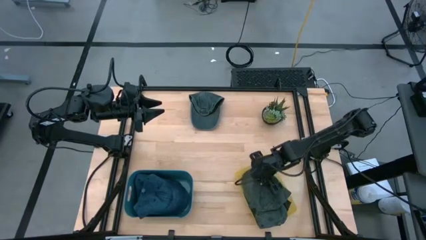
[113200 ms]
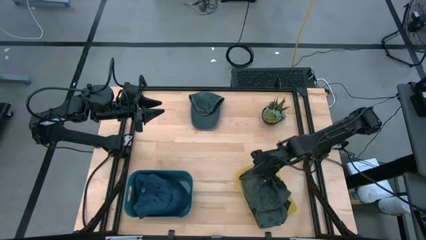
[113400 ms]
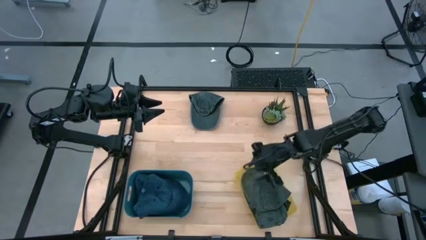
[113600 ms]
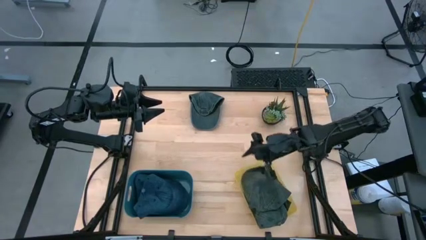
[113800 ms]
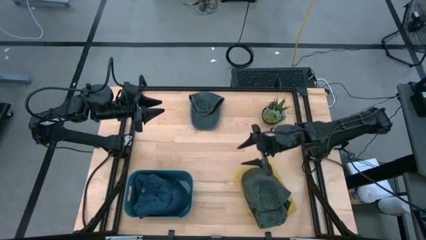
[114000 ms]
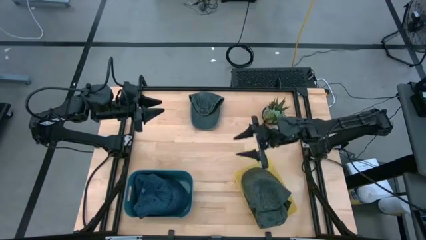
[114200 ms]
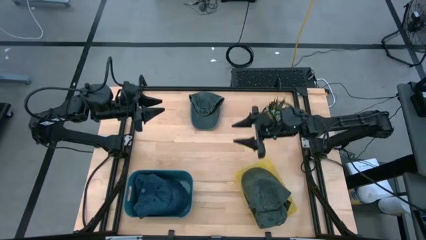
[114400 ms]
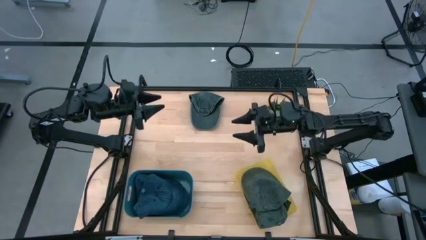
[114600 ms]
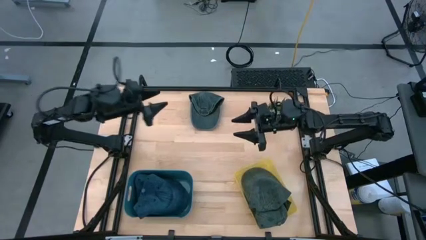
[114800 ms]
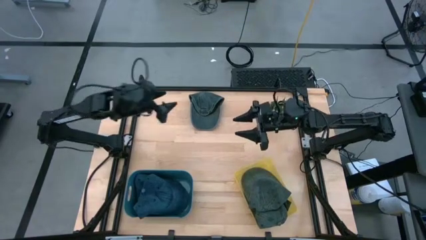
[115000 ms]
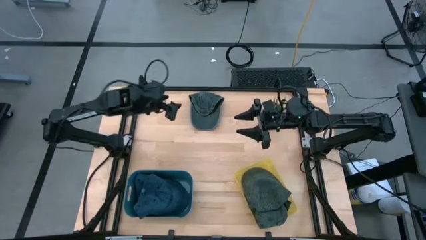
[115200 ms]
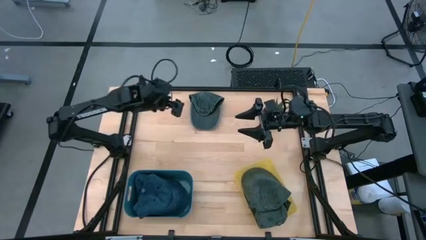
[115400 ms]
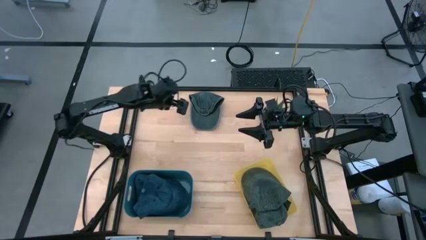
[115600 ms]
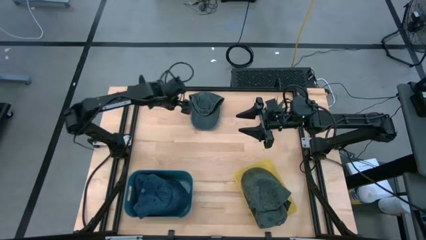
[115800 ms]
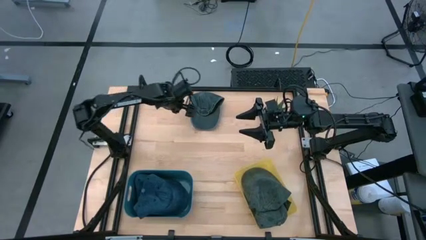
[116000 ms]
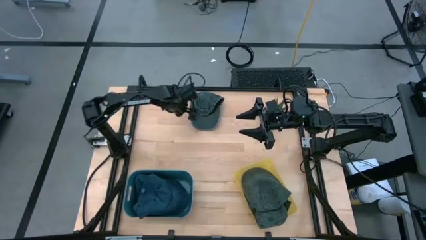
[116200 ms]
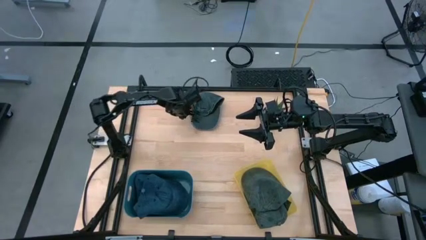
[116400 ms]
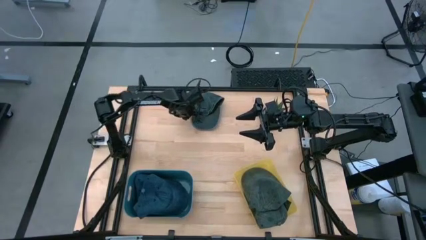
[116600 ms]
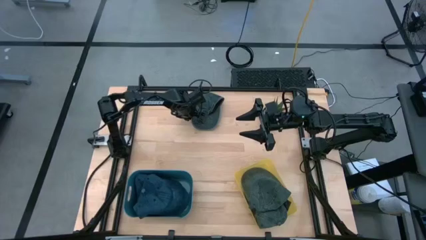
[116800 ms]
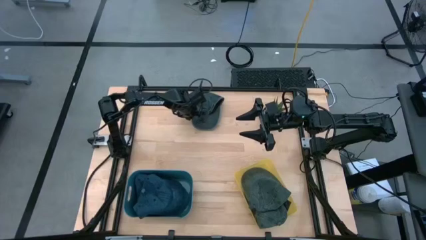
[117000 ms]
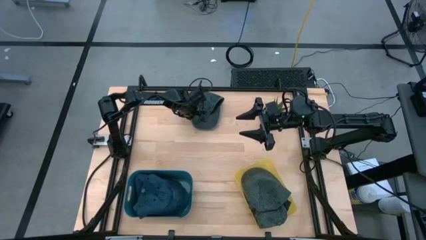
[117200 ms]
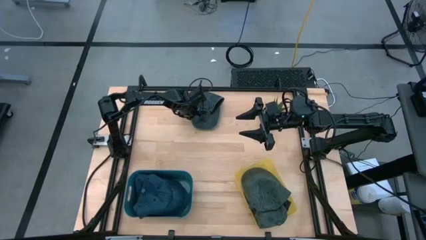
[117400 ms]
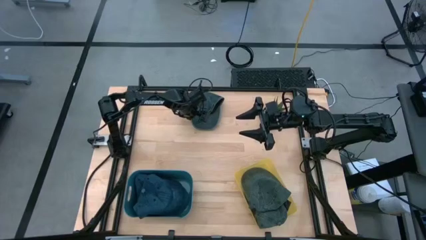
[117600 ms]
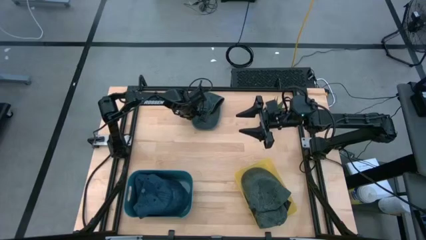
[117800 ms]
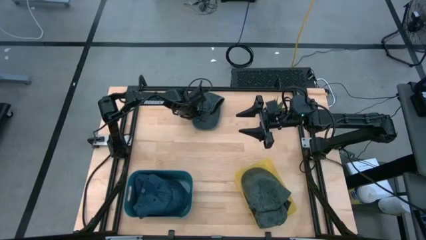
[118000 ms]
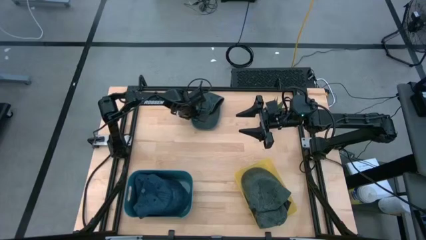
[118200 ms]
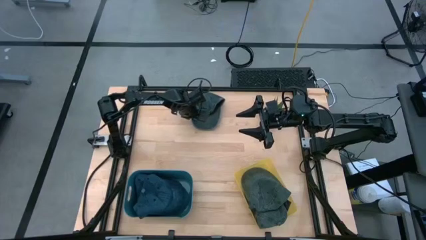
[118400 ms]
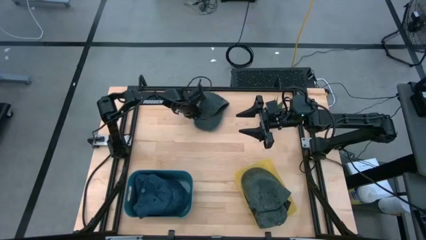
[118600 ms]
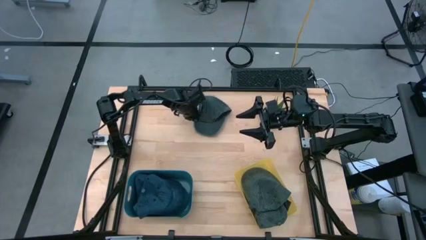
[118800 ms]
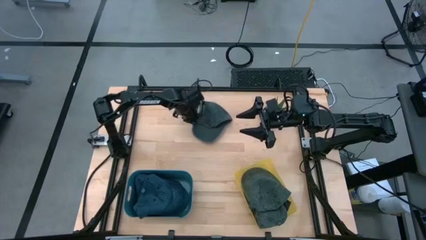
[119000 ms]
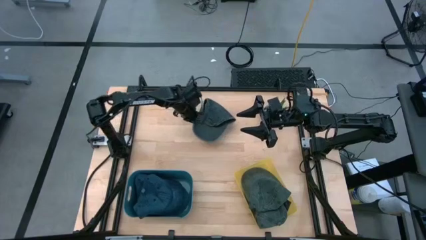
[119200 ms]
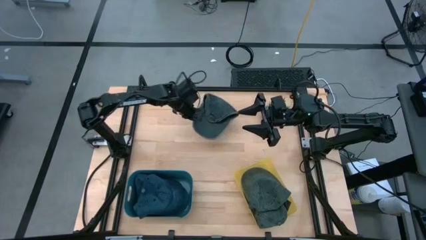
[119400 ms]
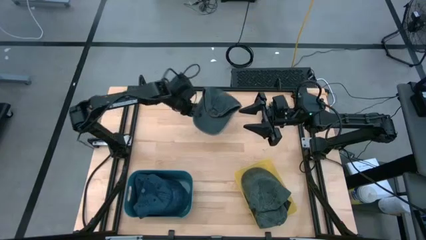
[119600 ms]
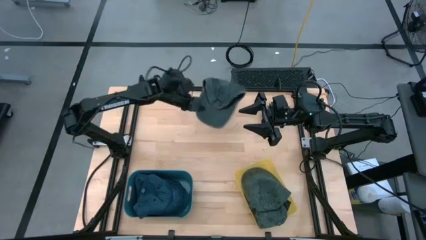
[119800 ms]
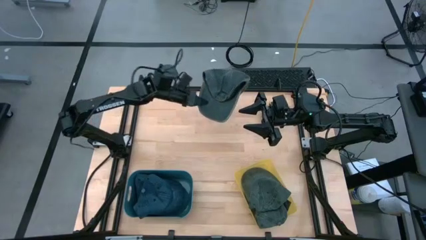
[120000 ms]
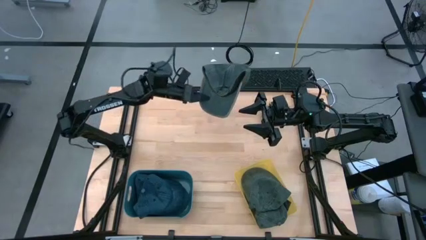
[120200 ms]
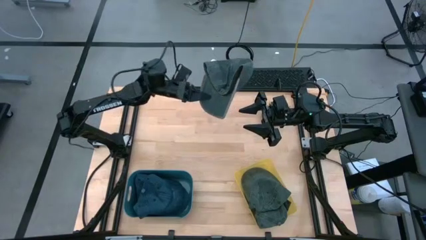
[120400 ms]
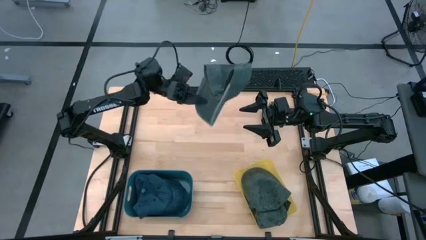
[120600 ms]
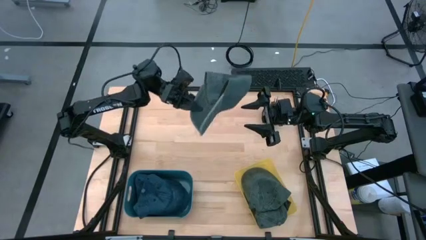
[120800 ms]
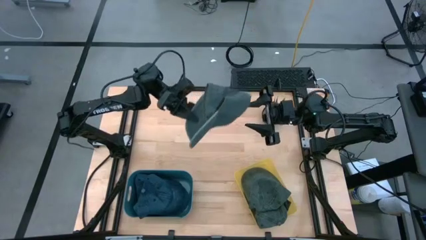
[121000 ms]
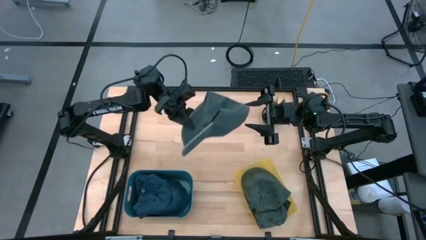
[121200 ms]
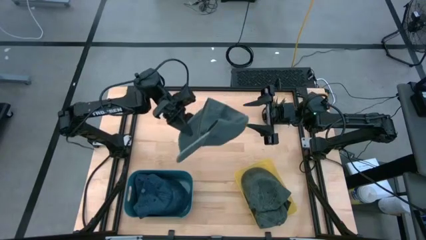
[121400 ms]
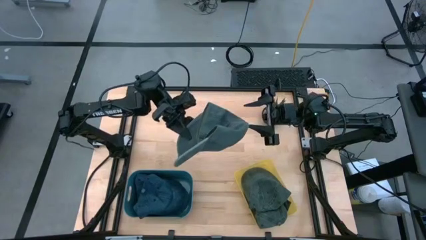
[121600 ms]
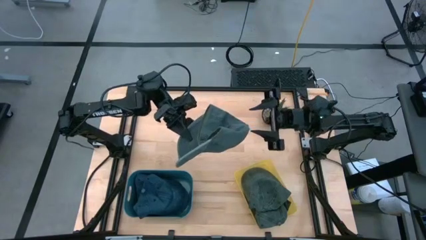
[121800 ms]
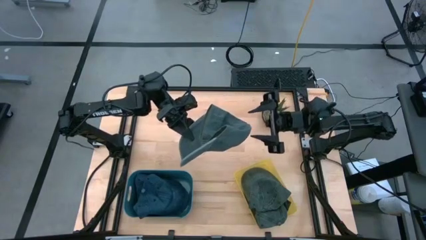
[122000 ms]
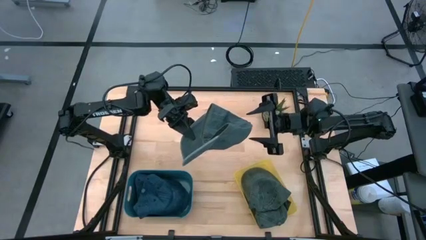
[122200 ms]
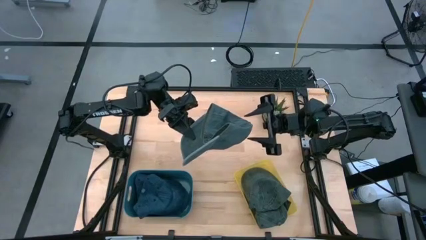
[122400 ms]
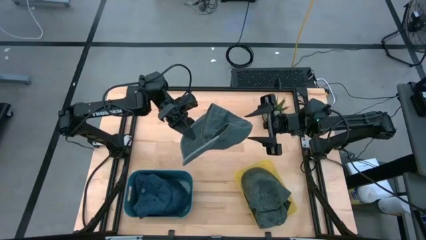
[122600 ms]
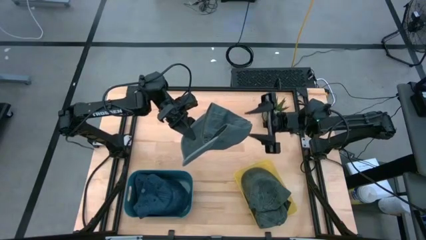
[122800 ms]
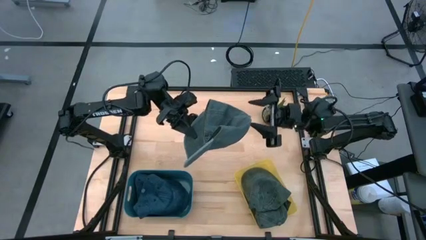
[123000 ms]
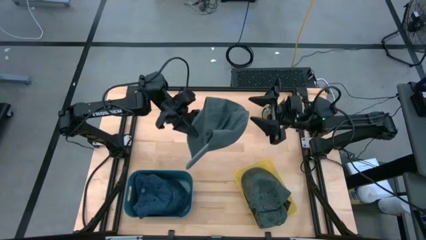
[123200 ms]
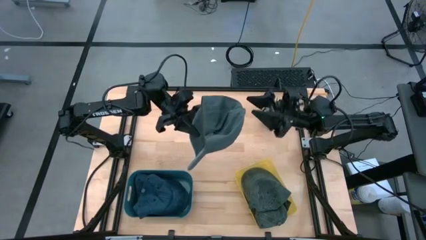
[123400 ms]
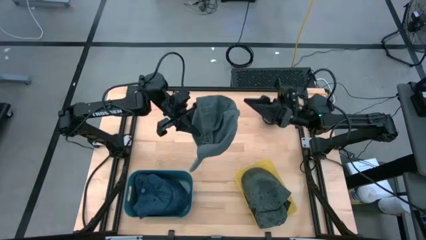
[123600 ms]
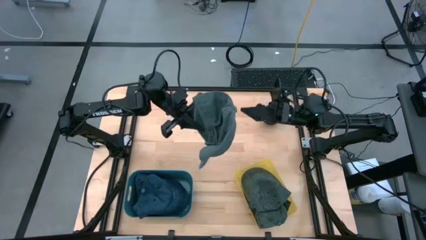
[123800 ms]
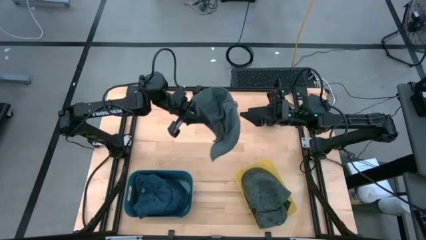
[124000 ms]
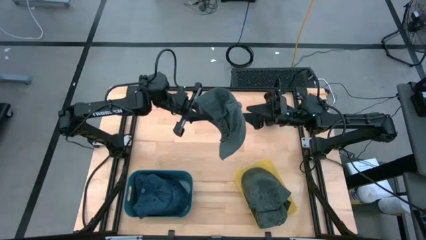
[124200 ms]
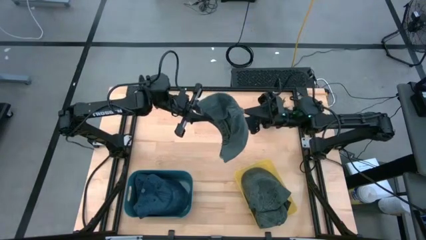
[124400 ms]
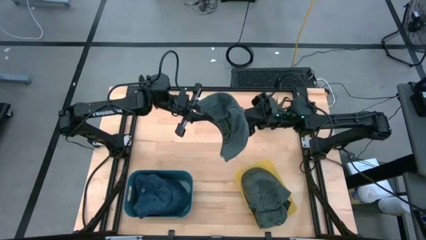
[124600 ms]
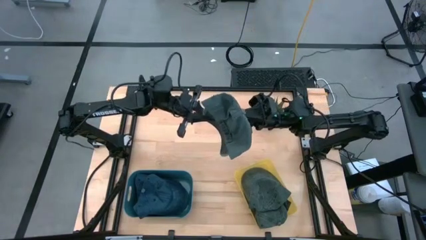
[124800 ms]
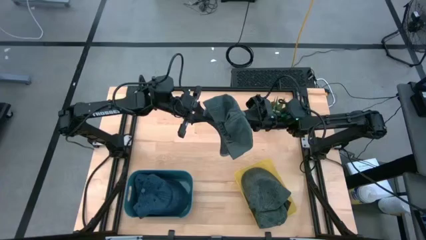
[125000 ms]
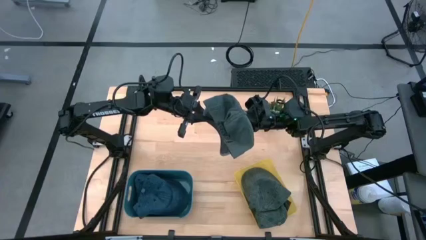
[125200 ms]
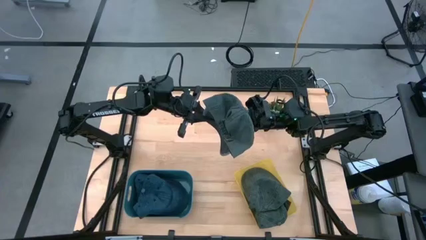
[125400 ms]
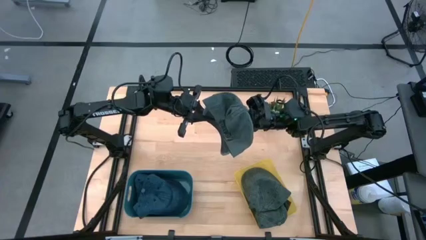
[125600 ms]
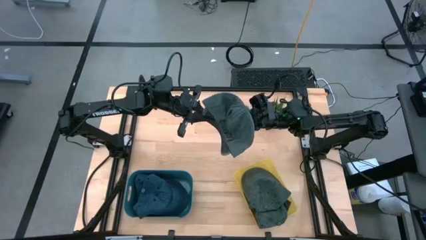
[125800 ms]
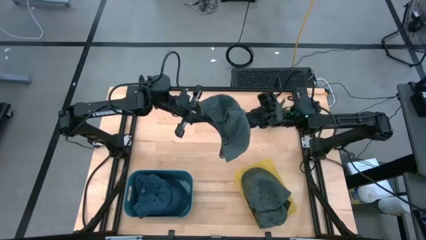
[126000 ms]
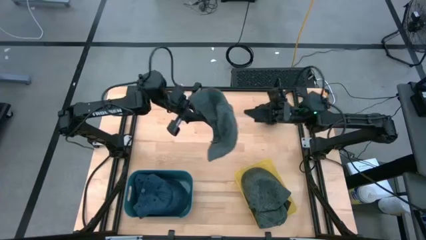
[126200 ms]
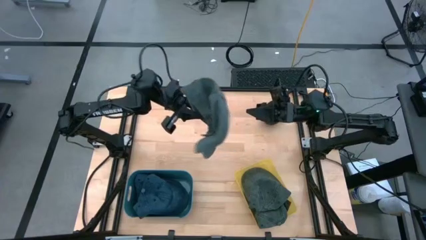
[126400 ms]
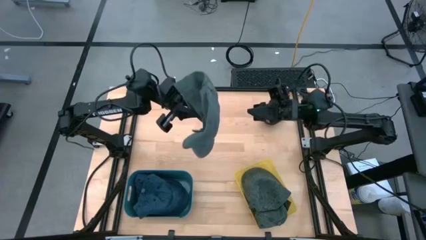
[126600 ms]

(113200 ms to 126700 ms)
Task: Pick & Place hat
Put the gray cap into the yellow bin

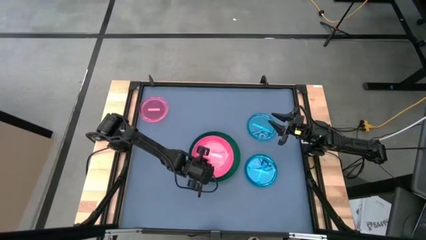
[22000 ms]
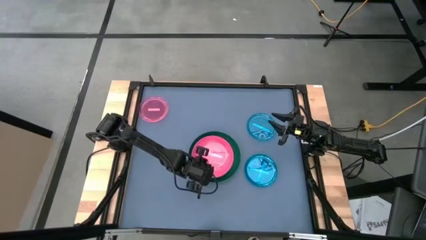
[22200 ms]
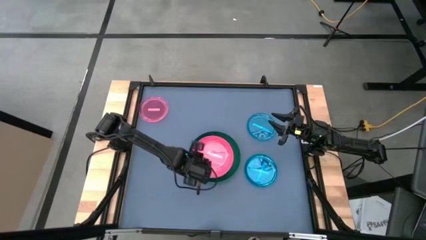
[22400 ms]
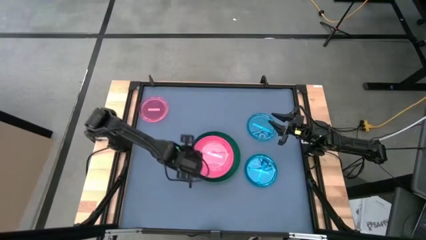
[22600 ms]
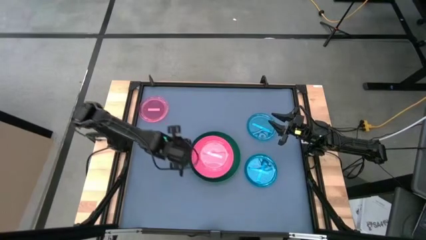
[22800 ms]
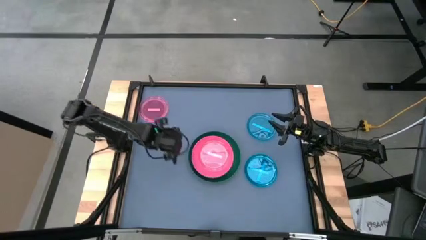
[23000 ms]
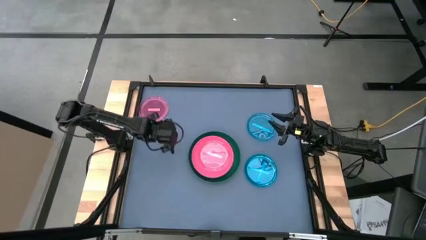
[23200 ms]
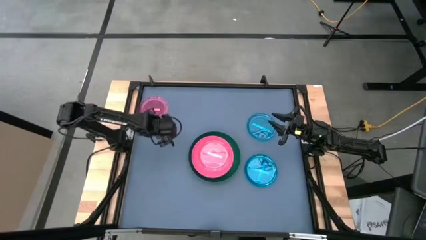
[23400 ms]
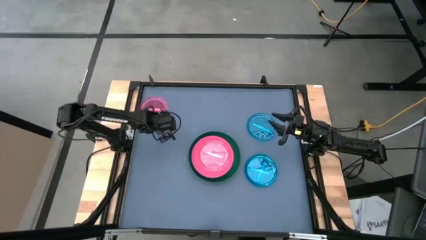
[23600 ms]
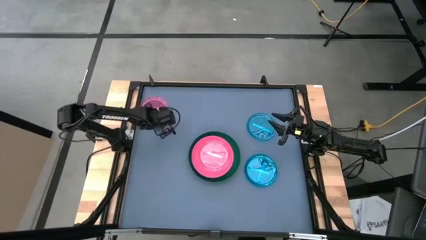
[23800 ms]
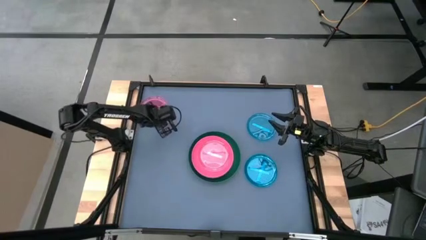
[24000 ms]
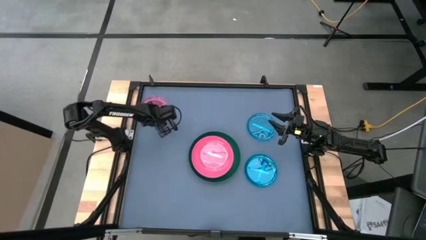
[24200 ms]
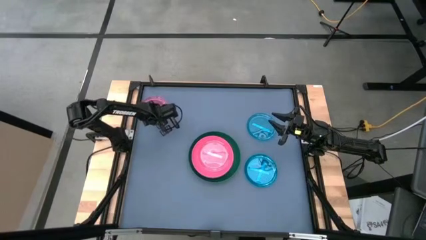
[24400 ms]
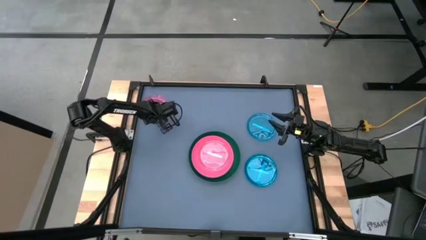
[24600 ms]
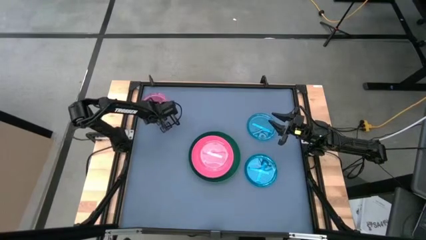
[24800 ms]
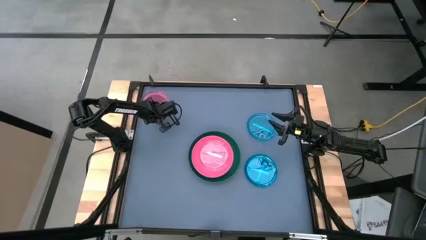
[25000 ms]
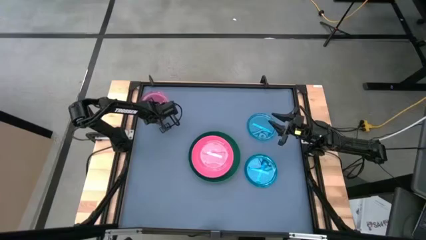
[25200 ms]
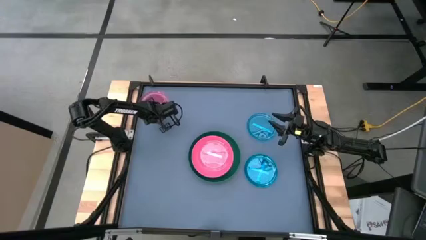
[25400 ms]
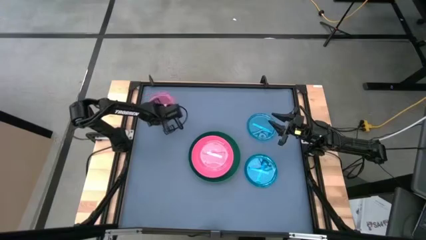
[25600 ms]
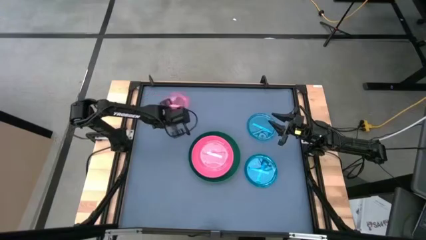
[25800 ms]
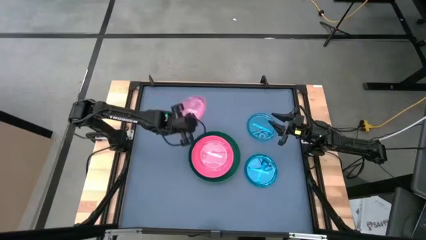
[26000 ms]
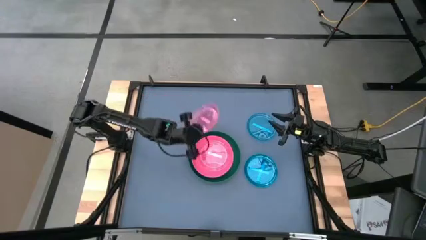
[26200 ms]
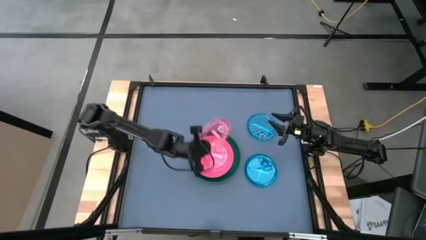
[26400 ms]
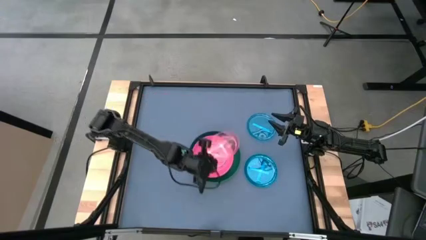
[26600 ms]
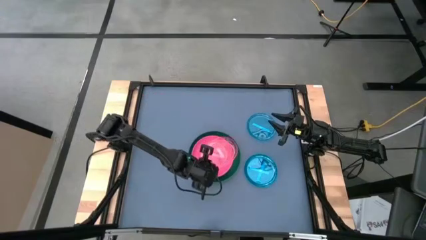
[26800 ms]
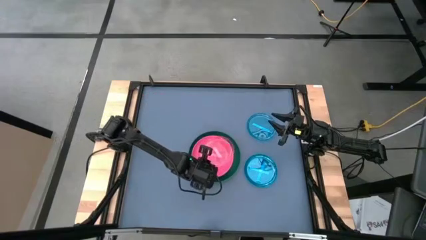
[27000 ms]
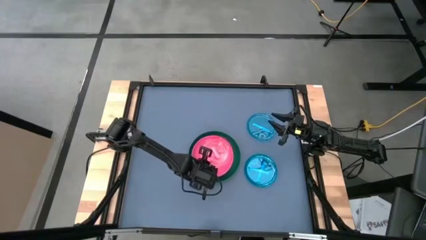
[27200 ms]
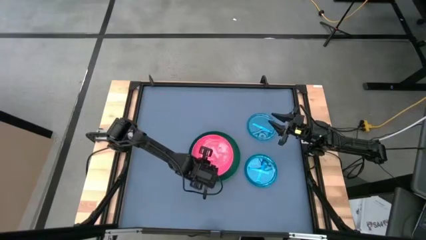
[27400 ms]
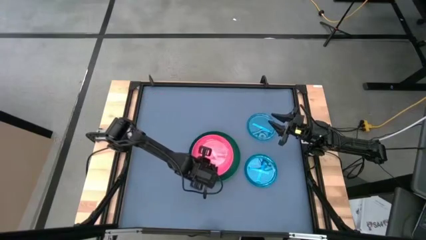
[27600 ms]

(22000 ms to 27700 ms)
Task: Stack plastic plates
Stack the transparent pink plate on top of the transparent pink plate
